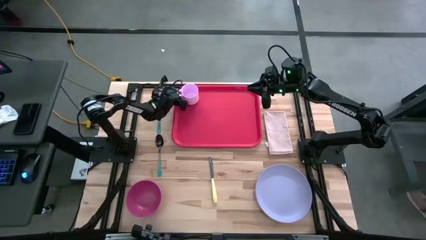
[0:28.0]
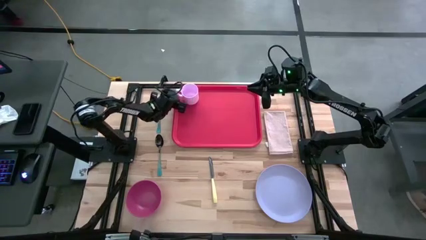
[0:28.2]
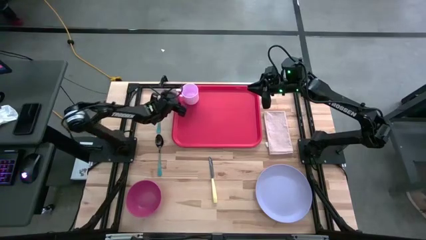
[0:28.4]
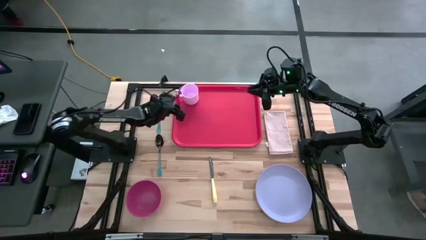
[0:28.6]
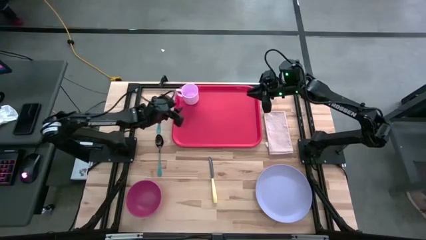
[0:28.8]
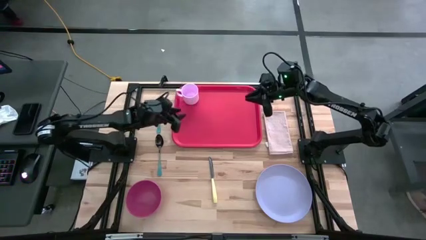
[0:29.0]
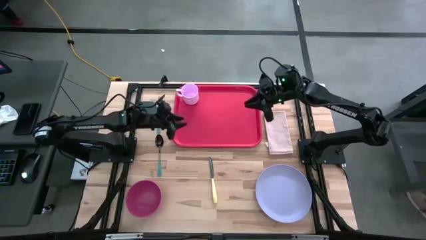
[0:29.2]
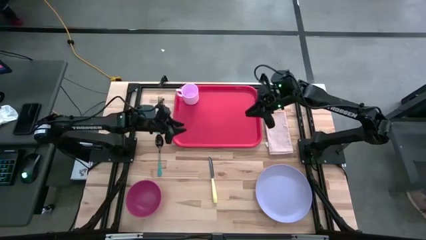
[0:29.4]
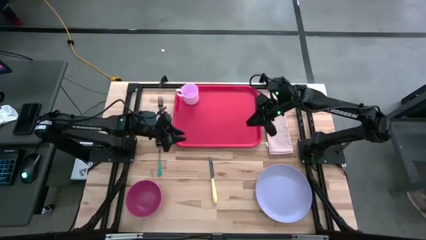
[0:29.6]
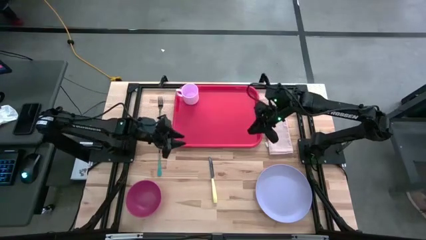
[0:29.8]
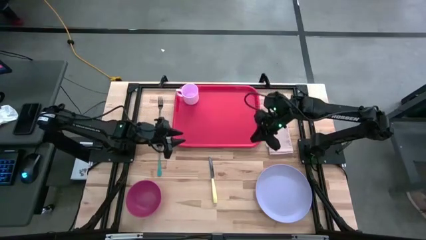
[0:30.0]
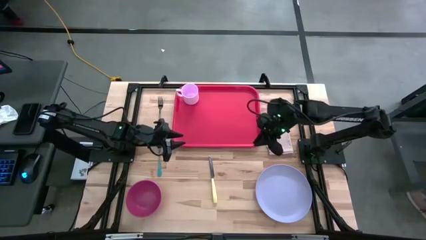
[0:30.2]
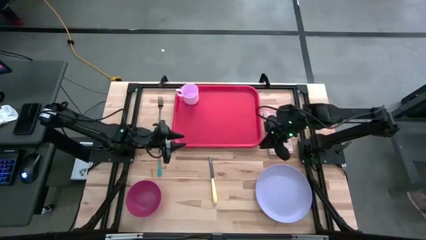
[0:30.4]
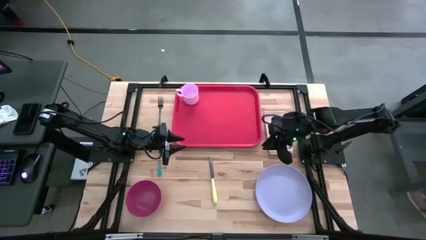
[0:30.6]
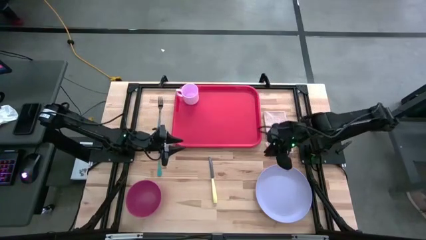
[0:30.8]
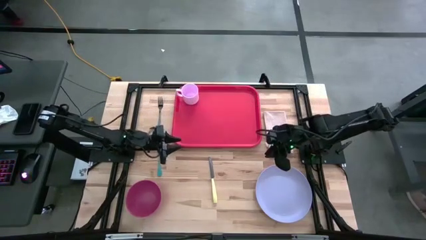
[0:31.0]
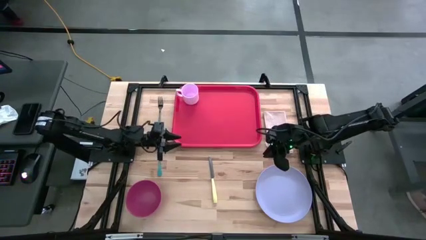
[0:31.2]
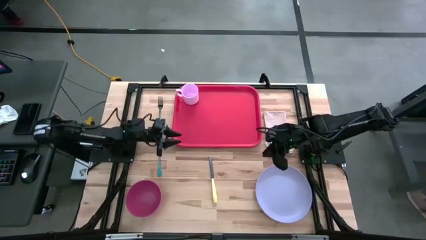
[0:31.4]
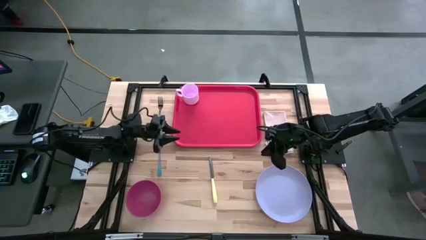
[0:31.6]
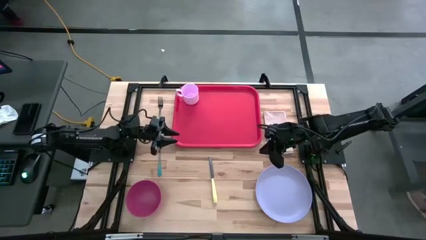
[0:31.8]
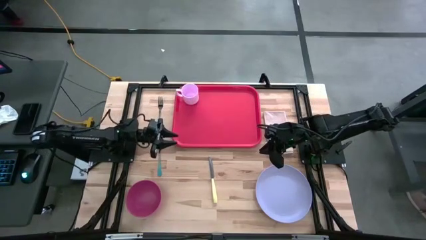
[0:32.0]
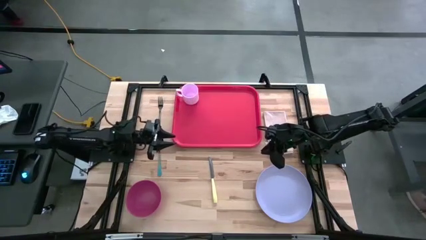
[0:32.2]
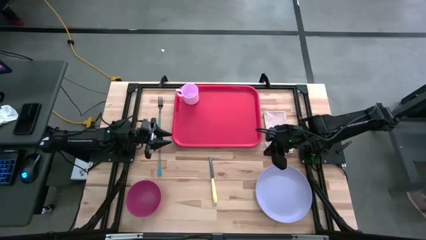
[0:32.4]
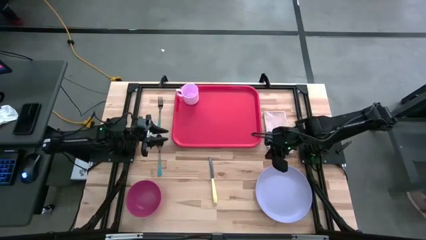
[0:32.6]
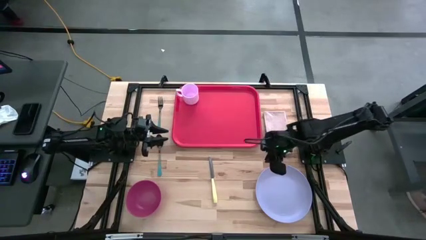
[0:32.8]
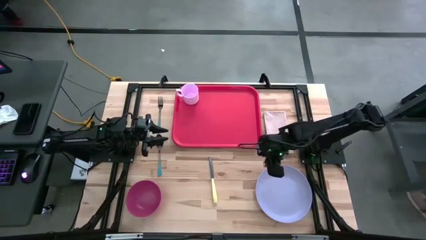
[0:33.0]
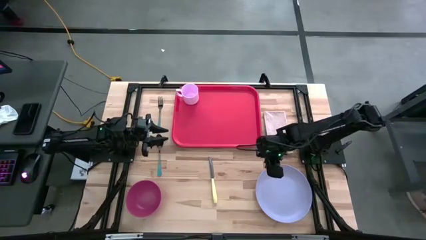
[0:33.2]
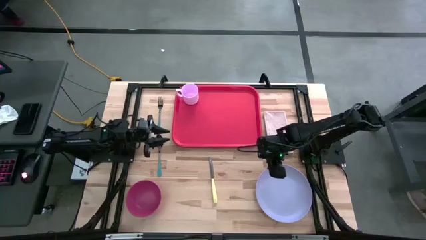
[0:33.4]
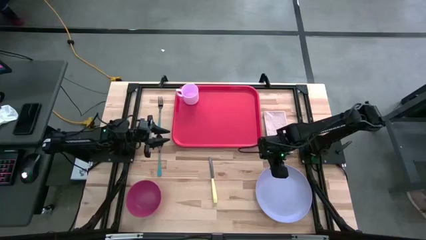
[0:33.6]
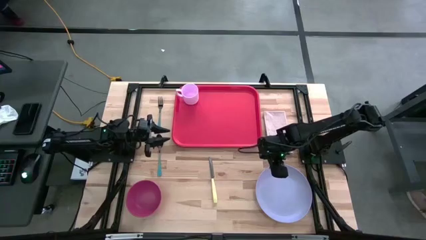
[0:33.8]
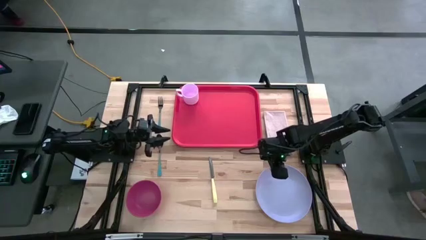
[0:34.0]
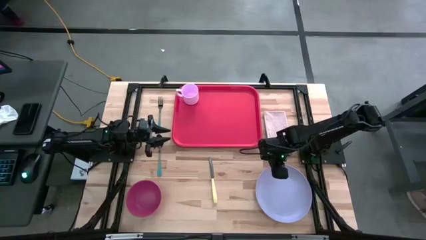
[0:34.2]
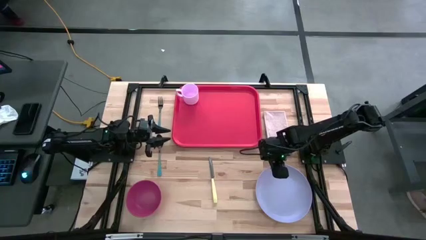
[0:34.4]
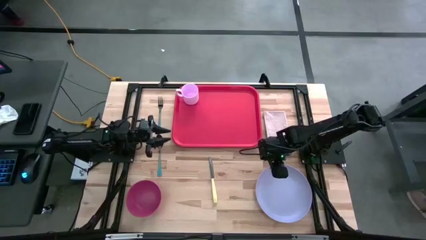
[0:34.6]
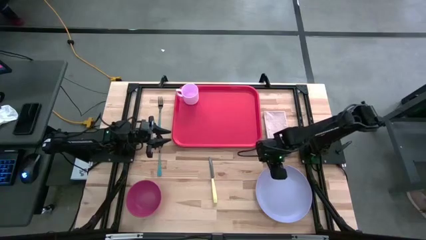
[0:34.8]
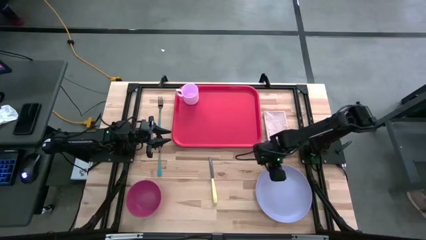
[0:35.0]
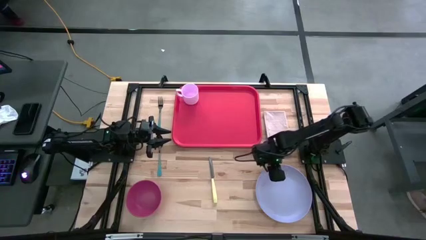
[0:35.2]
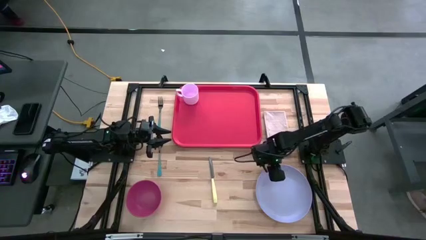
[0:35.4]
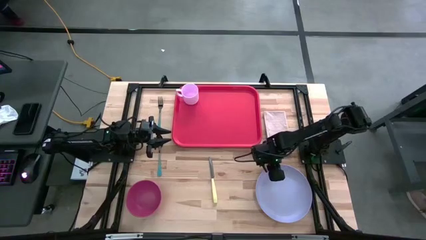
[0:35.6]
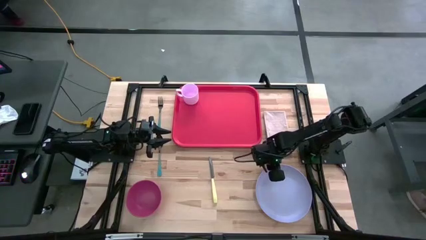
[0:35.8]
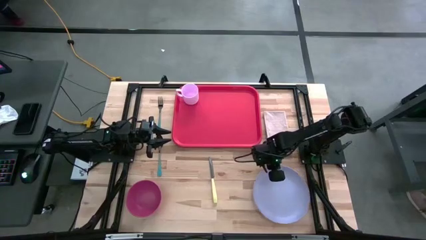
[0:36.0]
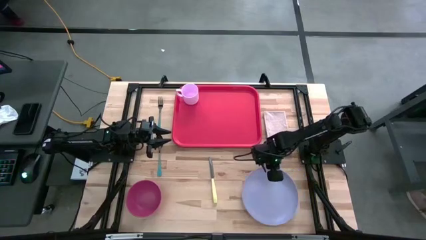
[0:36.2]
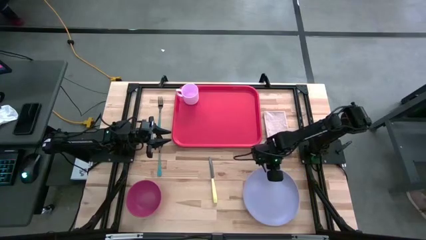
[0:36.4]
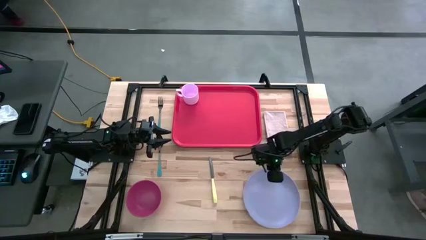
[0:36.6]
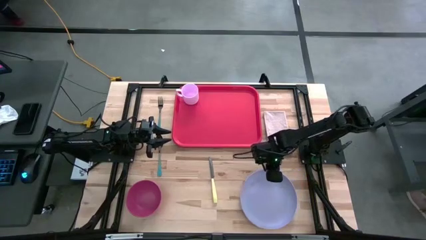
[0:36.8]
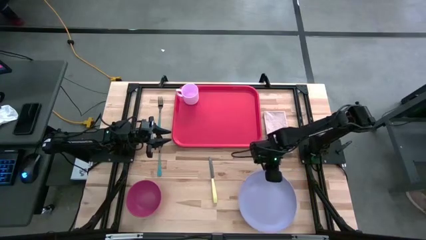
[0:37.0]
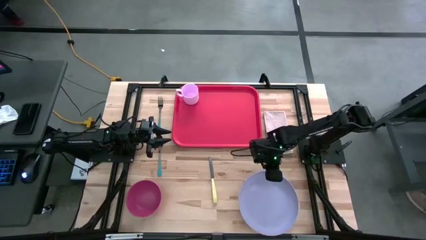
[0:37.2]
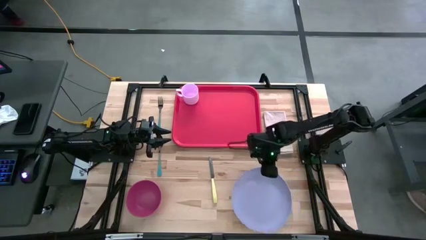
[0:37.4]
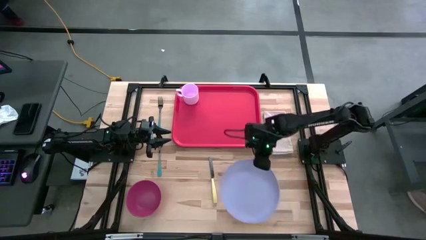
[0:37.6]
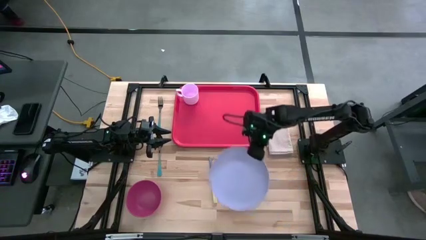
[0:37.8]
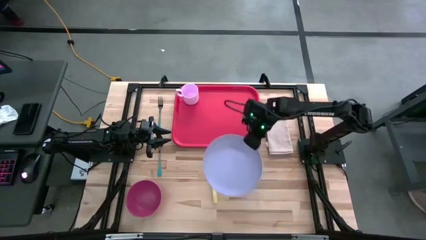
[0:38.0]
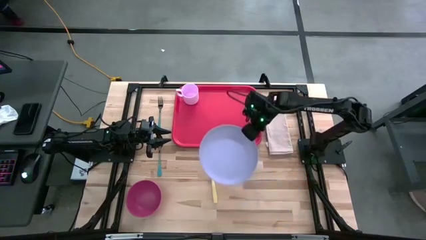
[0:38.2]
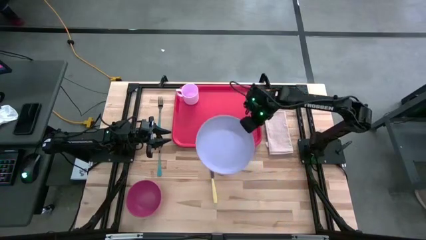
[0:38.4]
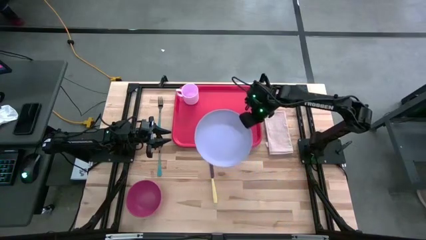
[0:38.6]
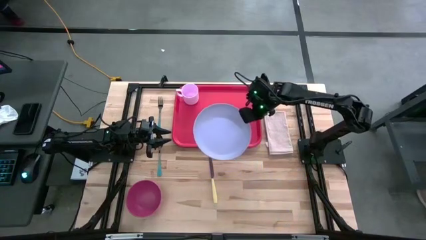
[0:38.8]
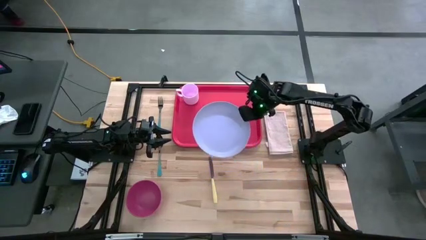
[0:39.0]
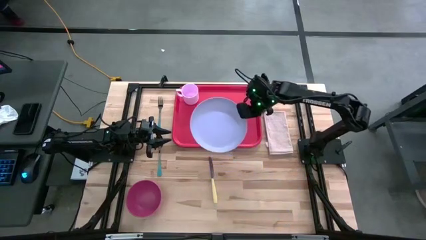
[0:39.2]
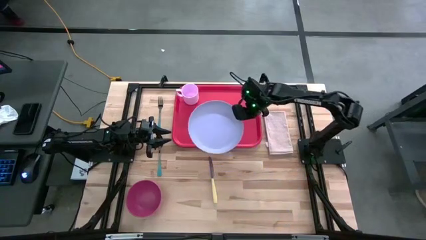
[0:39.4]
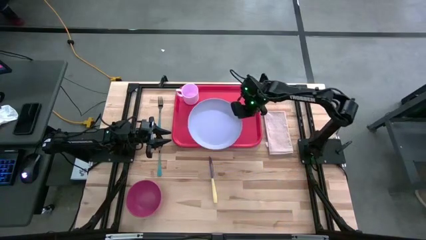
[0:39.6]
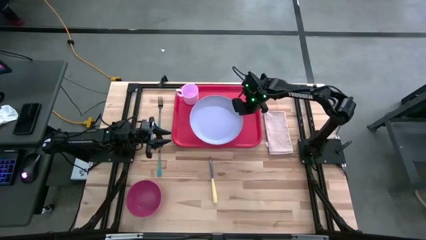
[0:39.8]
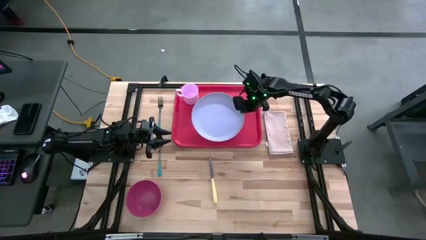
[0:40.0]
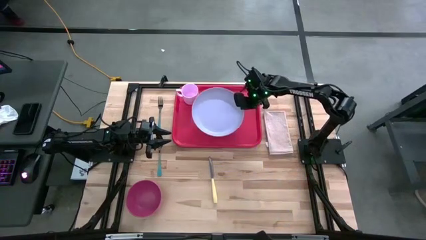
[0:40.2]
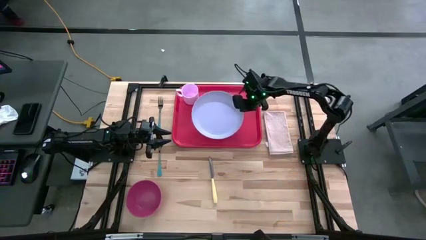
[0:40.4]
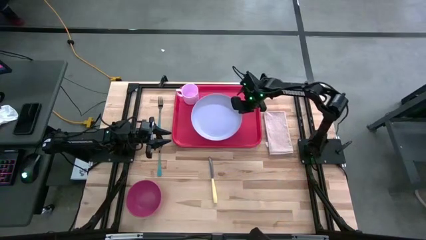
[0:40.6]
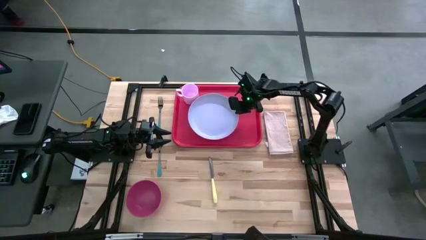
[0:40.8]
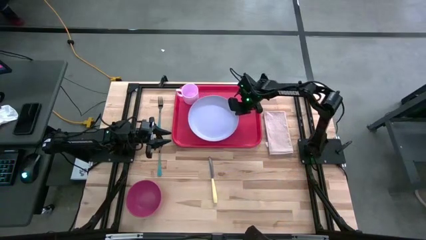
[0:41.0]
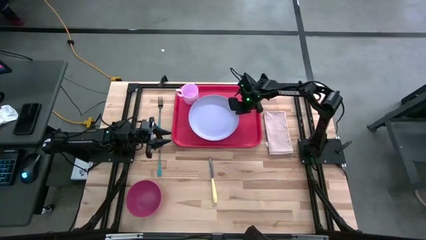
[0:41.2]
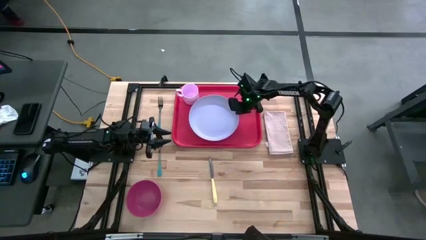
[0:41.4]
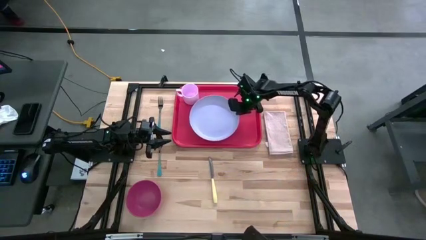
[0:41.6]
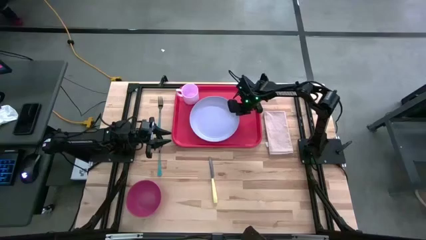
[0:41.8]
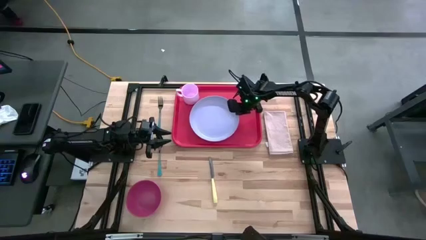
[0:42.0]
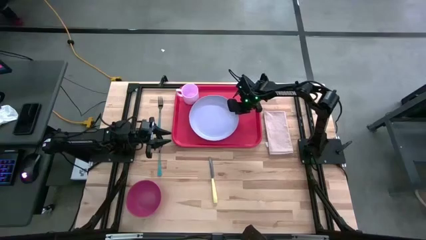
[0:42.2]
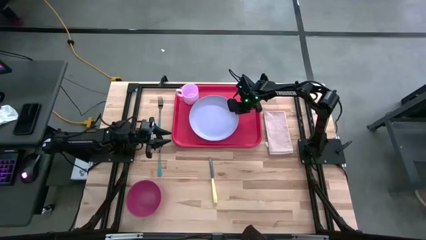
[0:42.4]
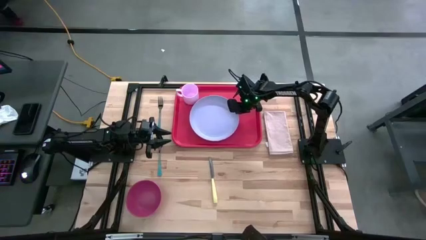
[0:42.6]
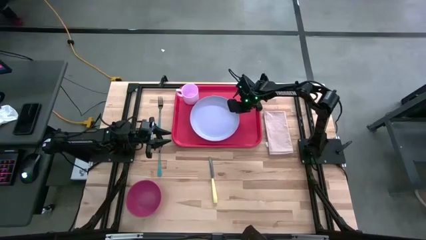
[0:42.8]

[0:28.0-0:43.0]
Task: Set up tray
Put the white plate on the red tray to the bottom right of the pink mug
